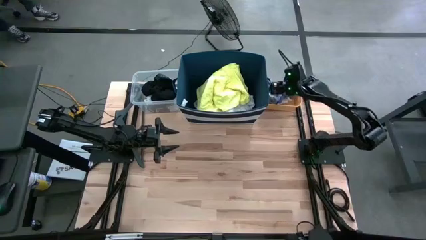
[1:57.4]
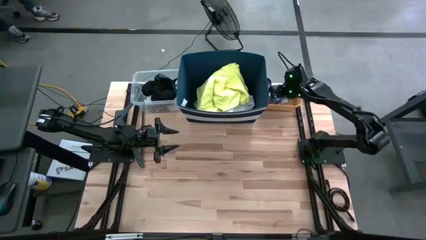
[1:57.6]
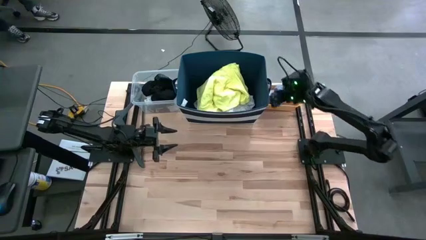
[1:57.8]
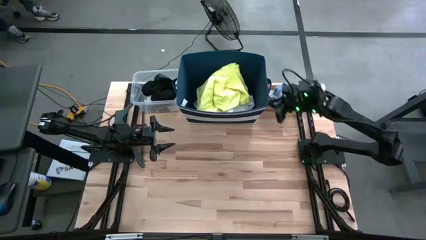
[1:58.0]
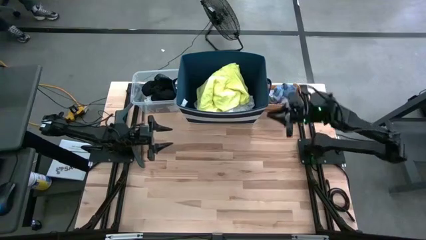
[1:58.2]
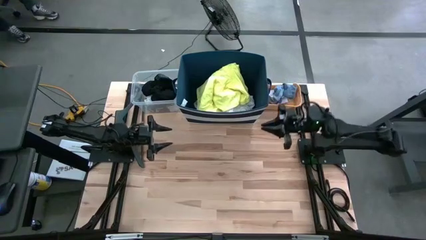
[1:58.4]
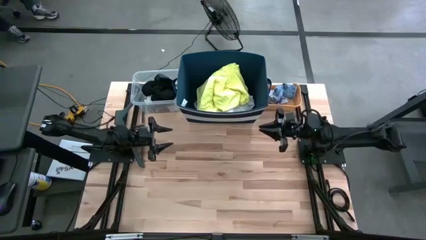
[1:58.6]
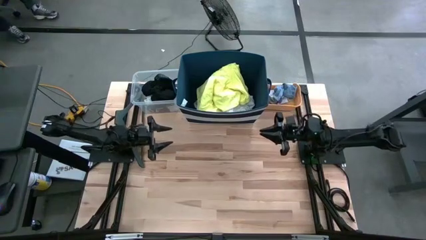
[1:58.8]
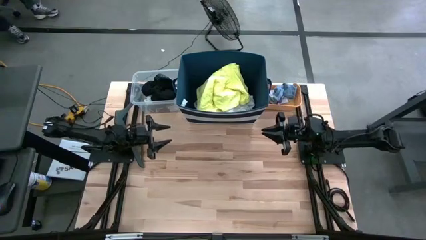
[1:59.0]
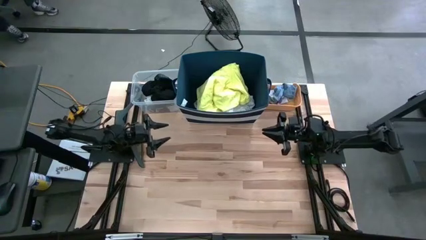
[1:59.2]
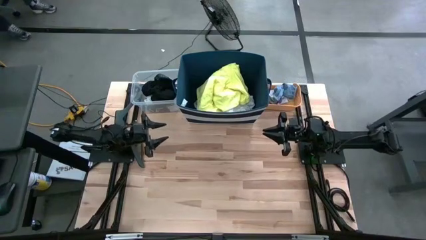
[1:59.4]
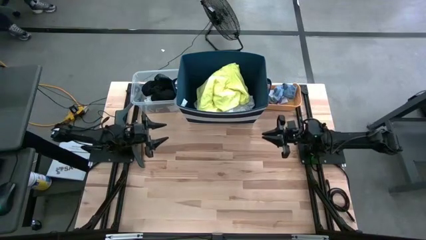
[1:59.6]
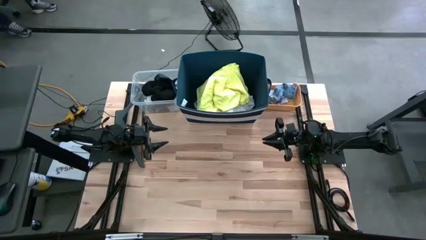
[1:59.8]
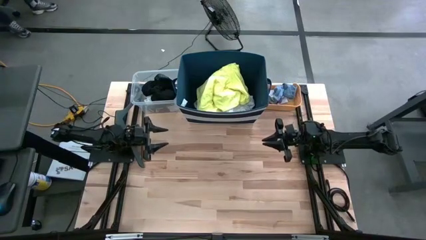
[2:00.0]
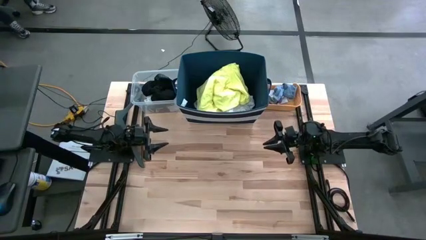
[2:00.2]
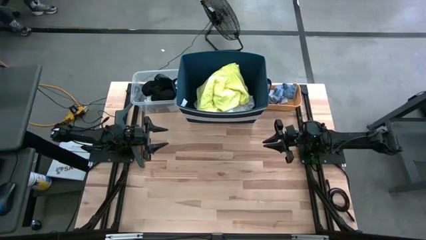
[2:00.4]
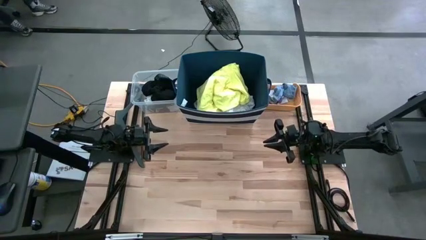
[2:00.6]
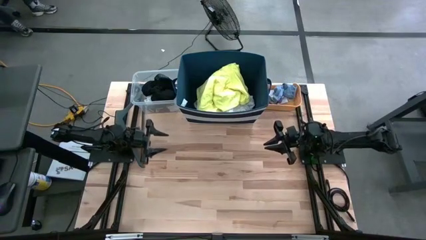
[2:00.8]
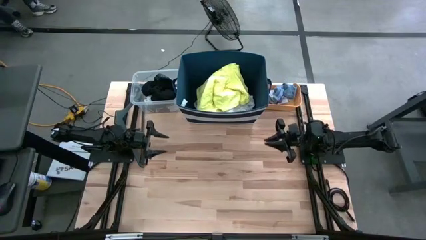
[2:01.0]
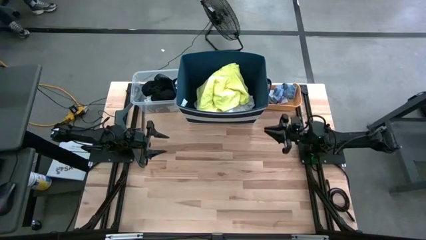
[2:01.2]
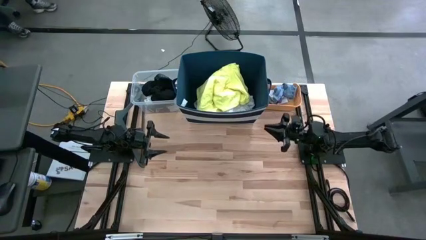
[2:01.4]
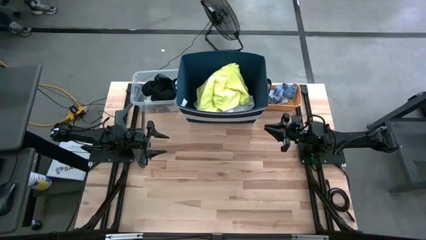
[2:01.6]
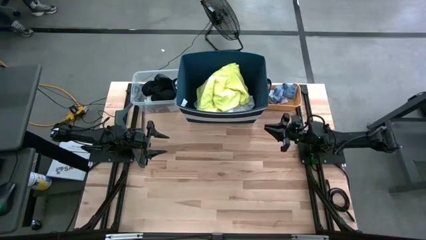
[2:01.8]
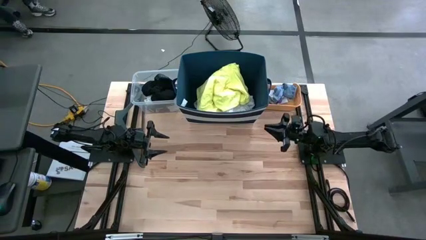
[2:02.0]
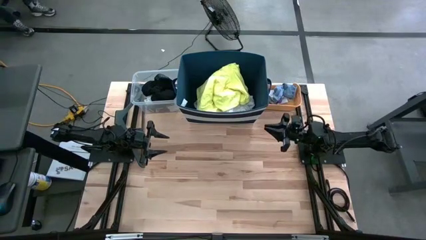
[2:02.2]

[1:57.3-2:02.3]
Task: Pick & Place Cloths
Return to Home Position

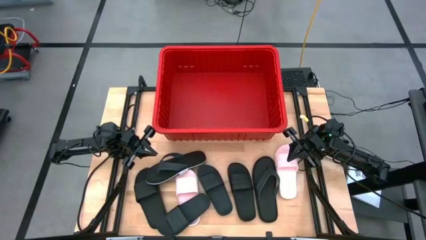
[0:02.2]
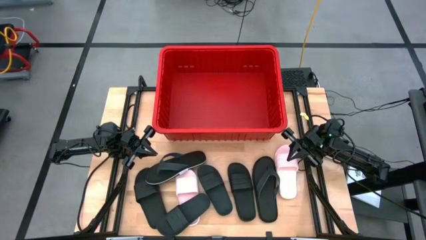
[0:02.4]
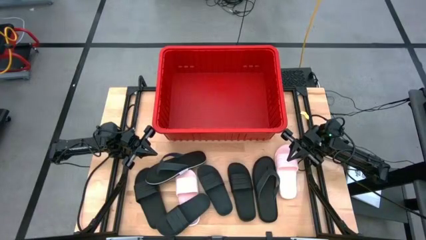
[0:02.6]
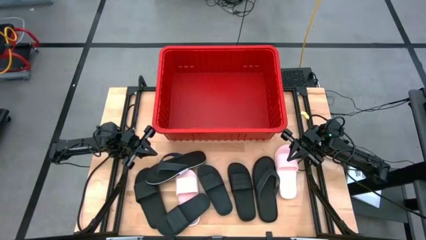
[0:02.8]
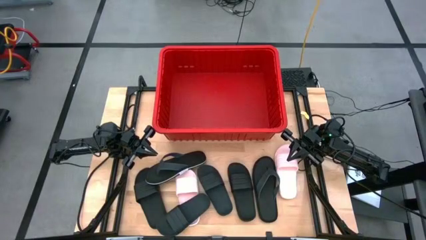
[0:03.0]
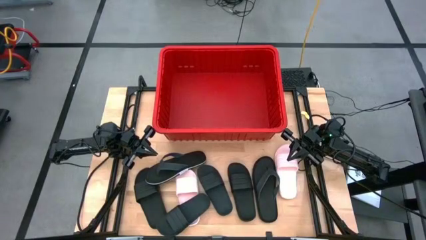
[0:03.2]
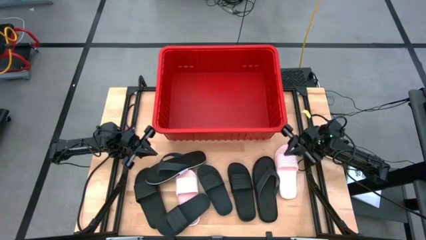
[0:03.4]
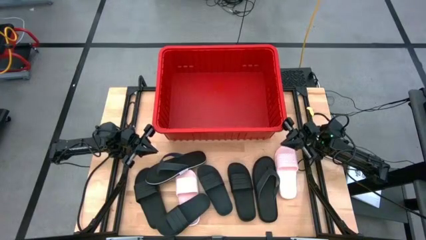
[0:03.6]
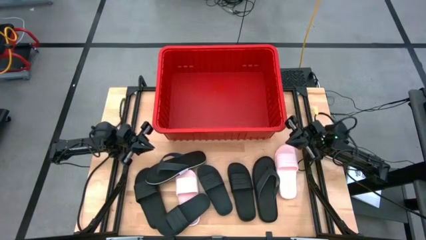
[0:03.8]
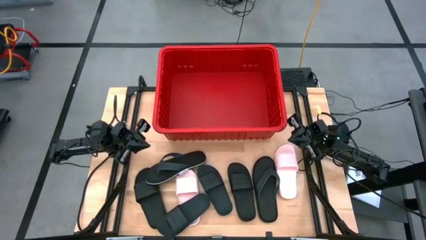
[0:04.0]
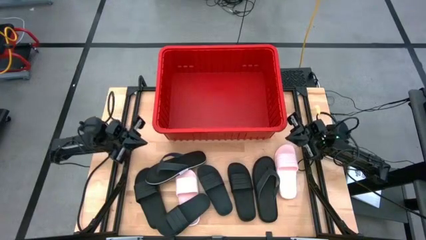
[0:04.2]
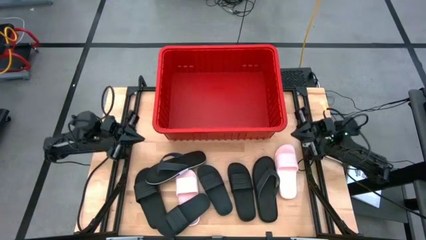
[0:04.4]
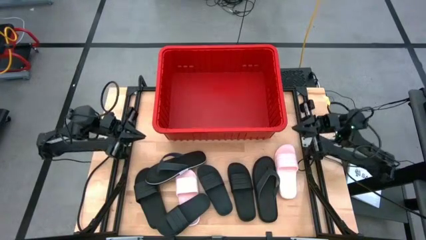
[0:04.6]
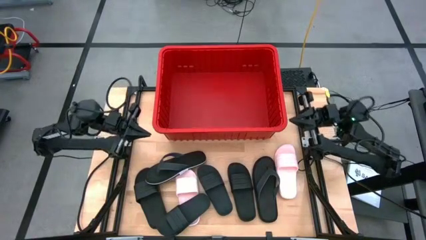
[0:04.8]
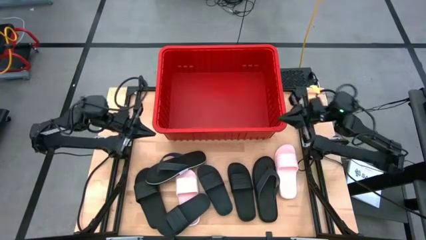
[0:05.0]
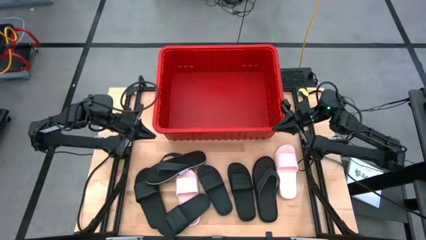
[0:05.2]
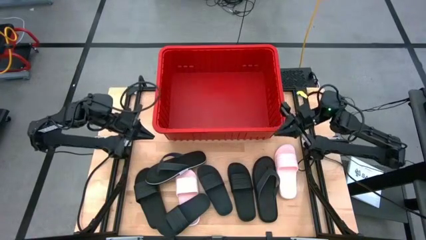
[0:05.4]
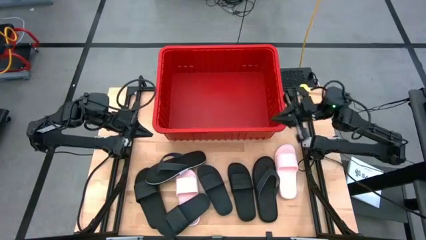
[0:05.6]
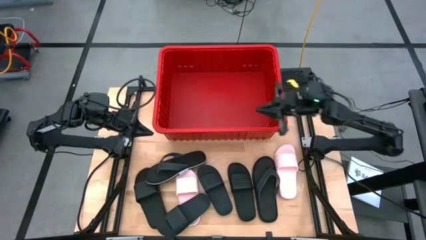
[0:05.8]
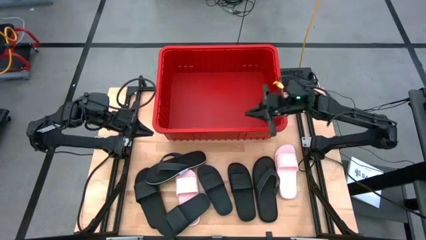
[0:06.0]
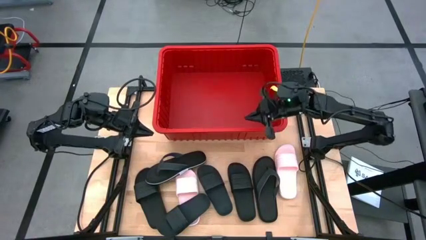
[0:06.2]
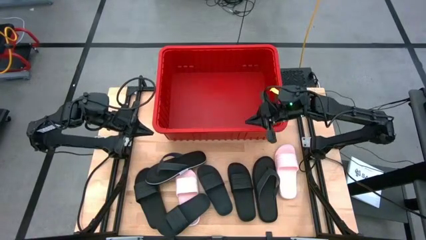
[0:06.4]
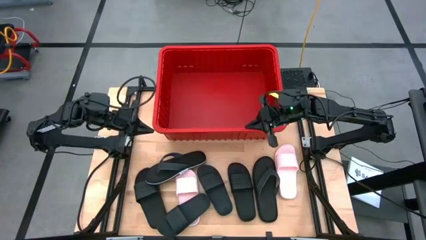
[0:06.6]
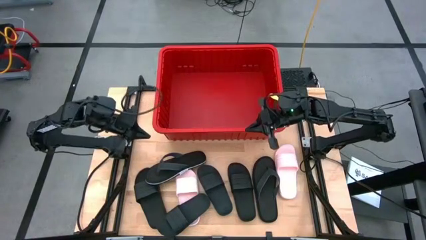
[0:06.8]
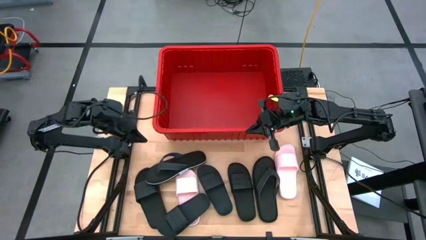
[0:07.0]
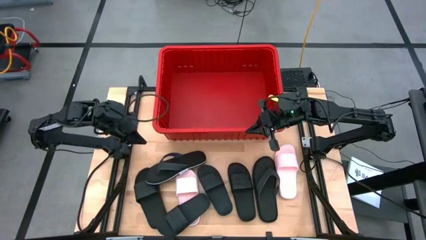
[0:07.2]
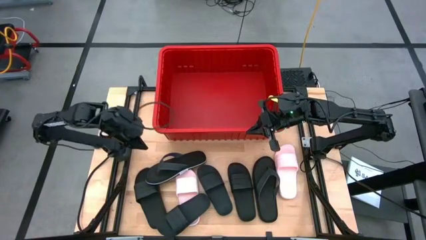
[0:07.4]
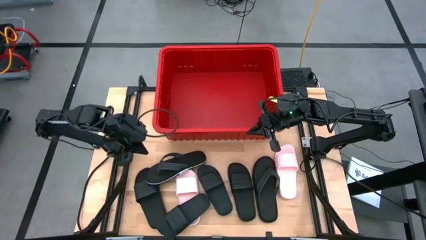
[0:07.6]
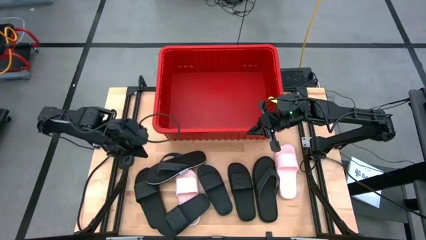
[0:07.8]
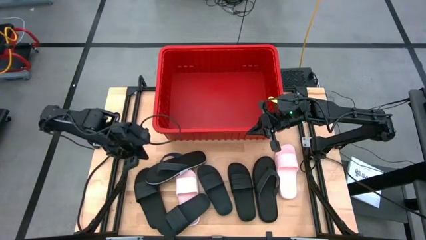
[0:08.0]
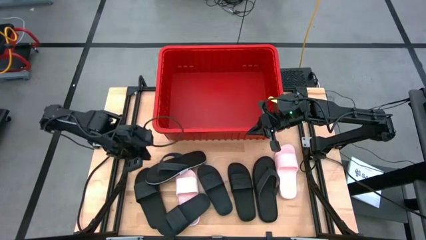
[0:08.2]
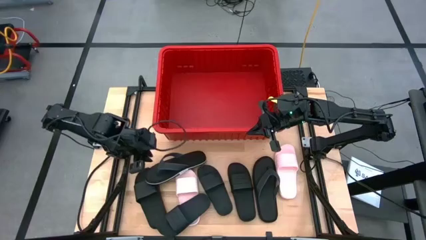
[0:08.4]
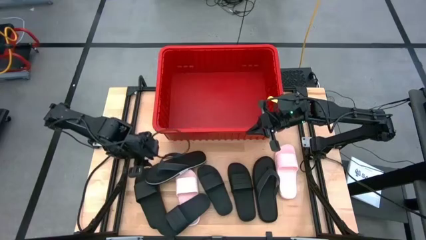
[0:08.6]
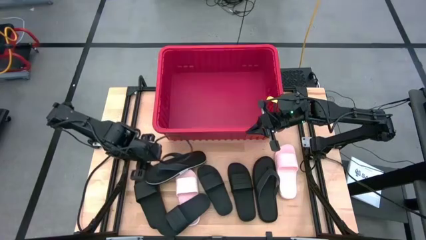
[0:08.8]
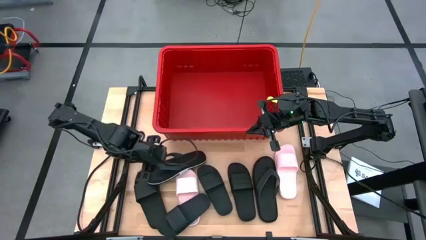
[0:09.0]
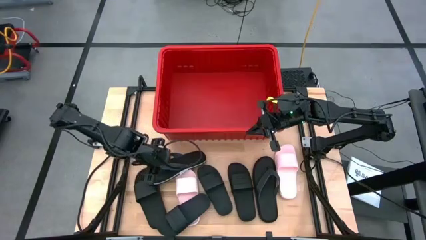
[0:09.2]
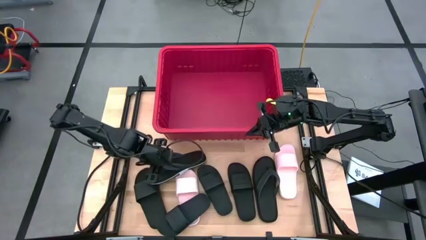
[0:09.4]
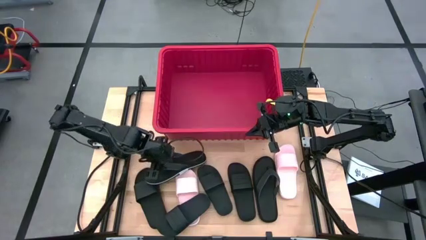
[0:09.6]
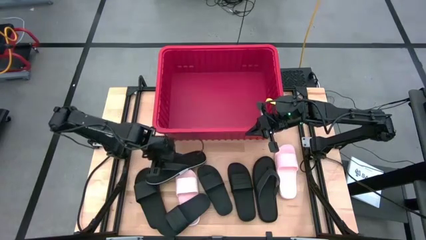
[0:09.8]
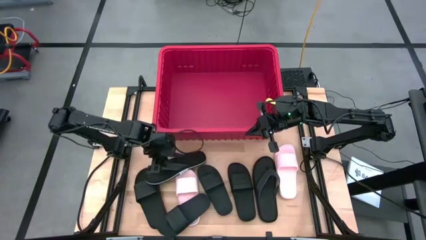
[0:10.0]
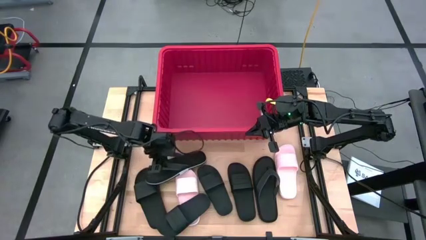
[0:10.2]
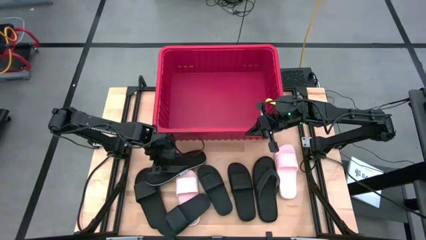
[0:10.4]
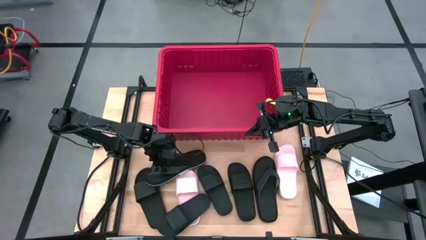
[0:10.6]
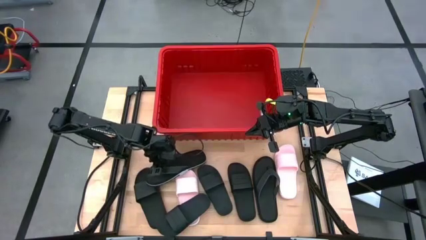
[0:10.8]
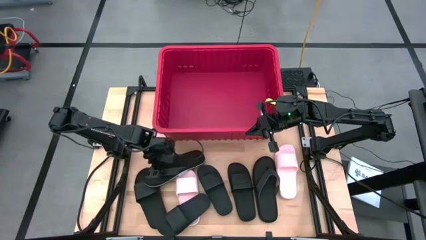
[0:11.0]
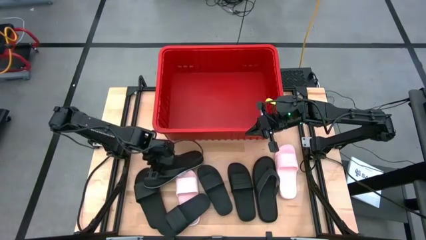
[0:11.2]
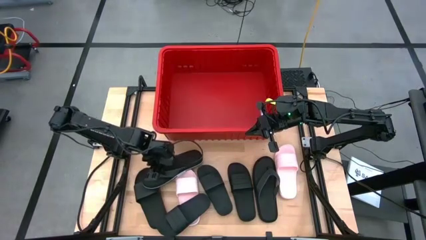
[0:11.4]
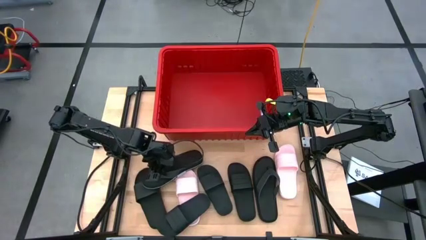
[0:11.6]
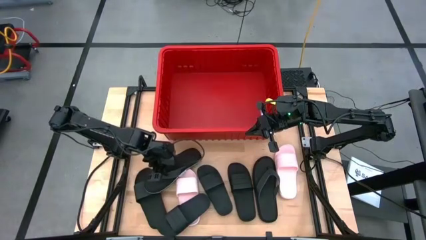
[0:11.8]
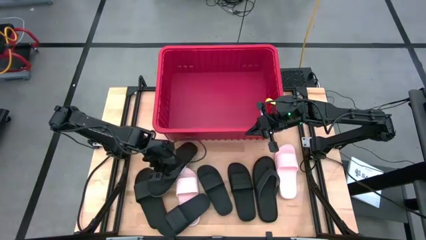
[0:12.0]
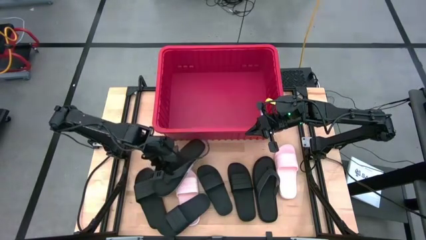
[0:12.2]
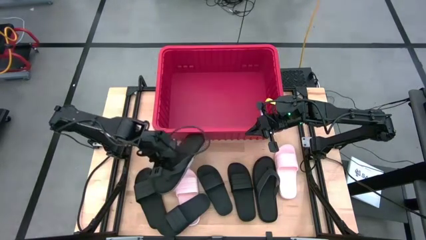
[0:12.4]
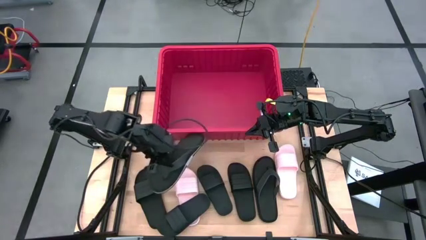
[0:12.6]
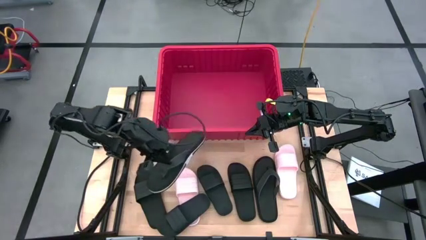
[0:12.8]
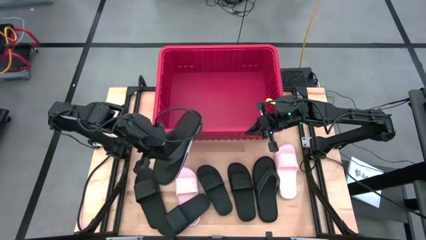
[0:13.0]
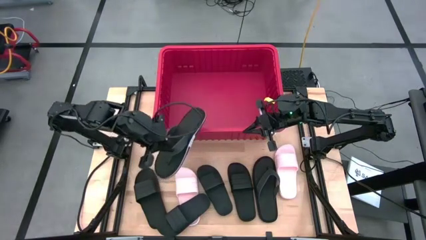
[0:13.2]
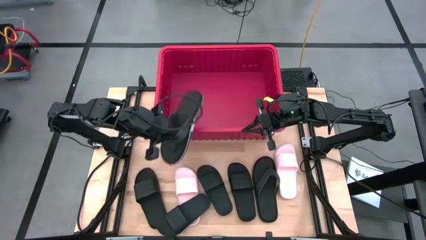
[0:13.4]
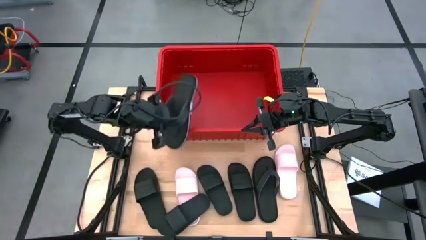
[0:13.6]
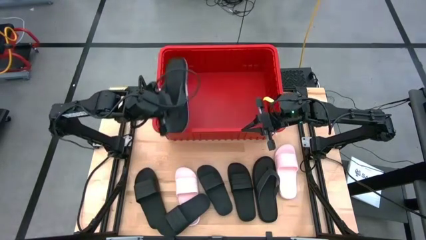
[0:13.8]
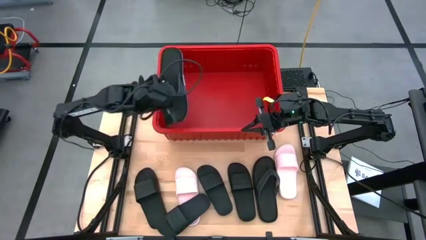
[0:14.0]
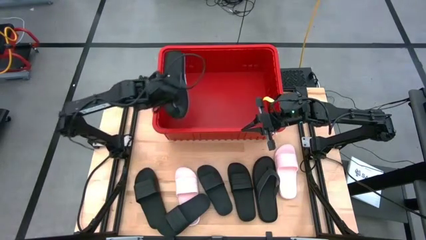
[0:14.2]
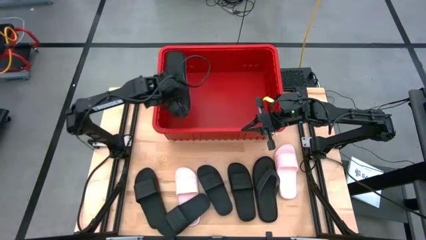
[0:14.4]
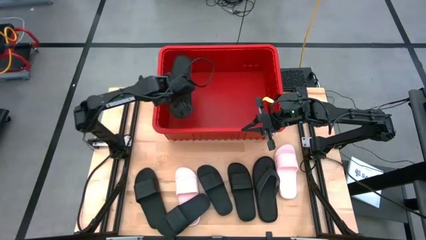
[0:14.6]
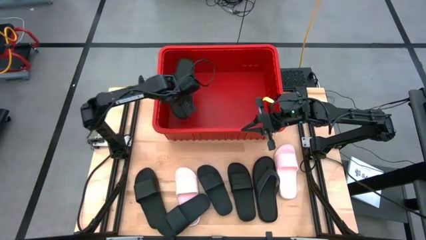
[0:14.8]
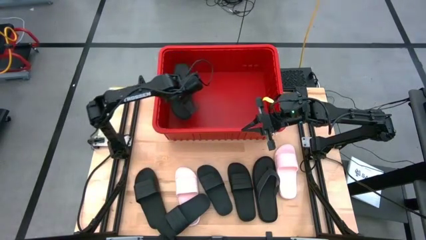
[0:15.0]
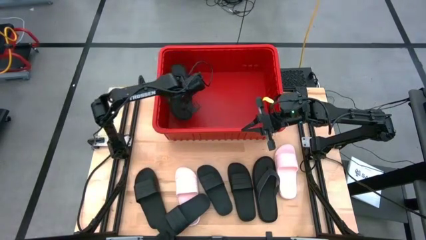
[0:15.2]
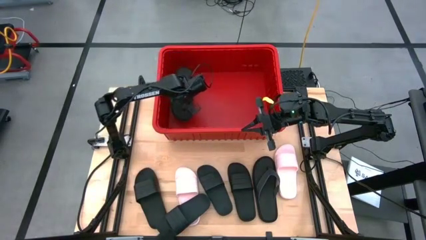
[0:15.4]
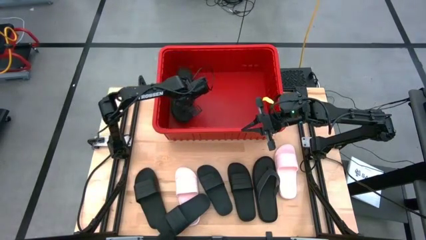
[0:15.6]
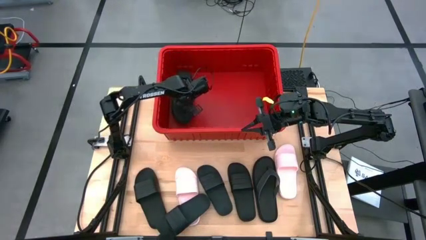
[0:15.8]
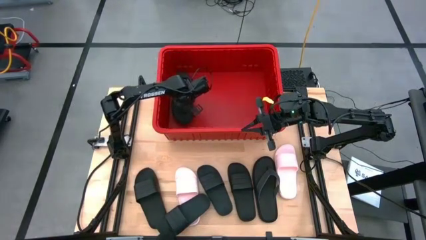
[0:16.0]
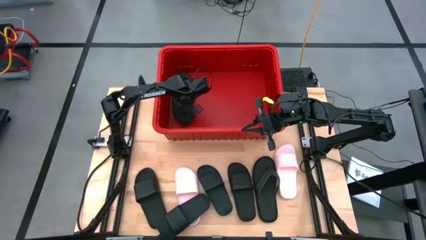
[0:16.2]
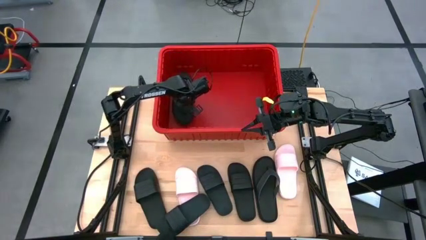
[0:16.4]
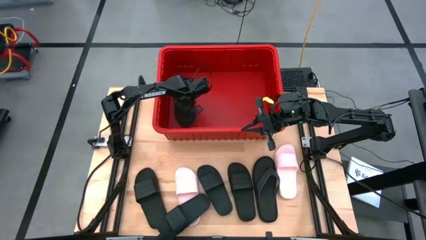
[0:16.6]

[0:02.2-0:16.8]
Task: Pick and place slides into bin
Put the black slipper into the red bin
